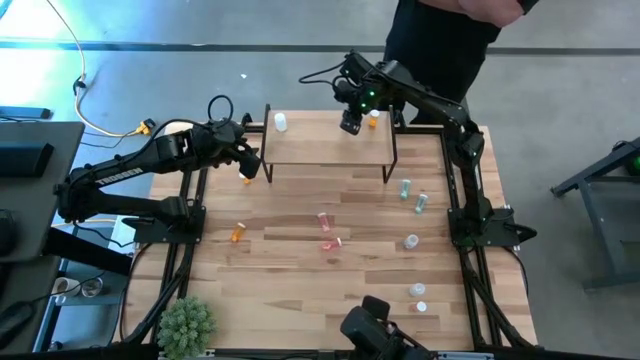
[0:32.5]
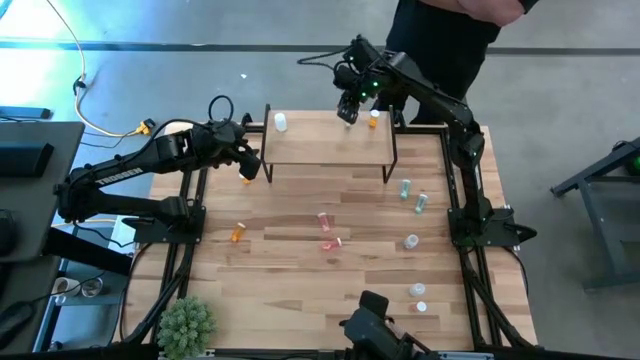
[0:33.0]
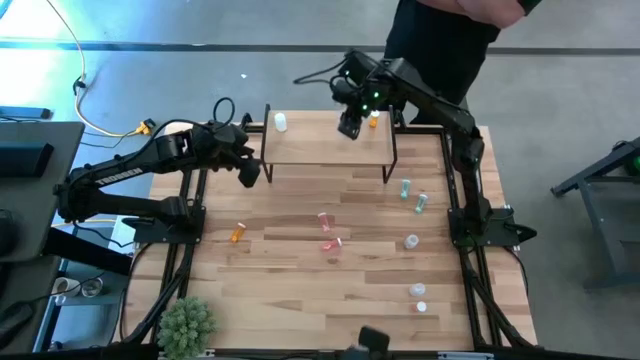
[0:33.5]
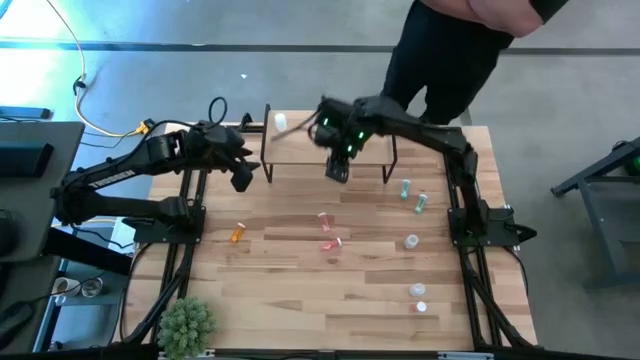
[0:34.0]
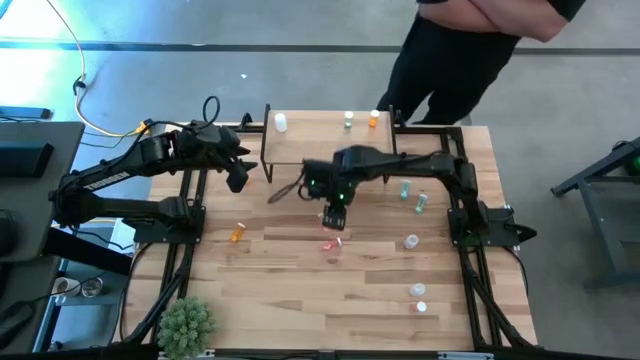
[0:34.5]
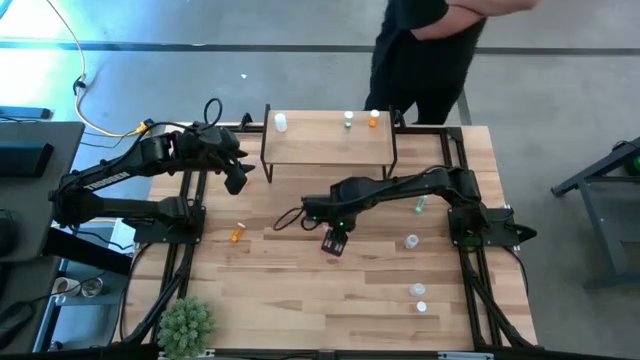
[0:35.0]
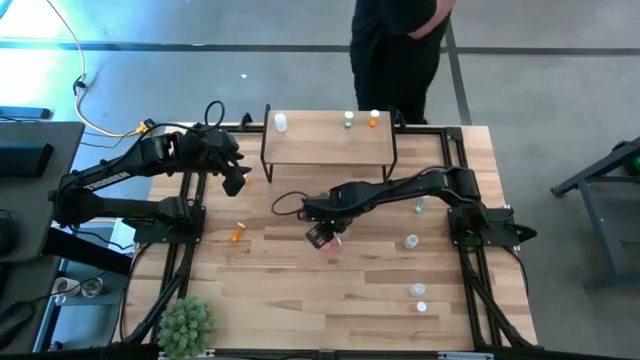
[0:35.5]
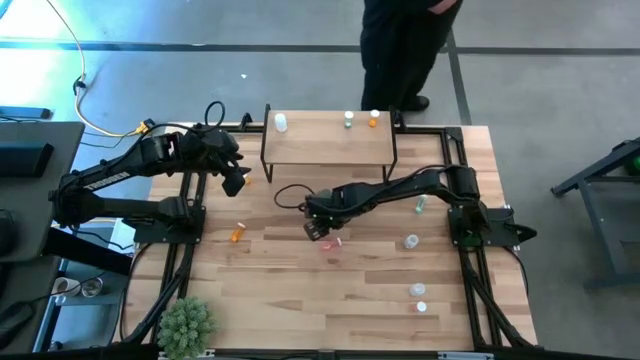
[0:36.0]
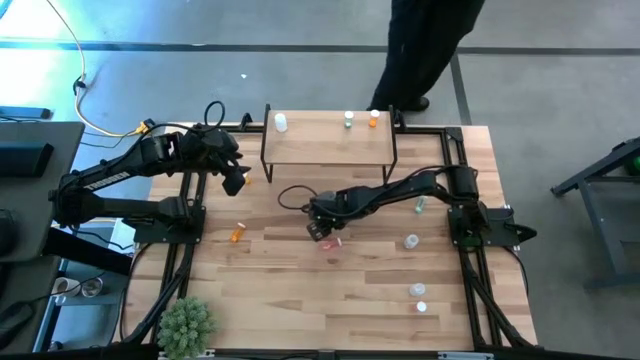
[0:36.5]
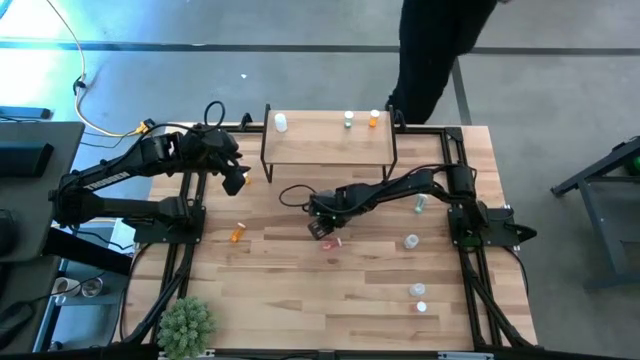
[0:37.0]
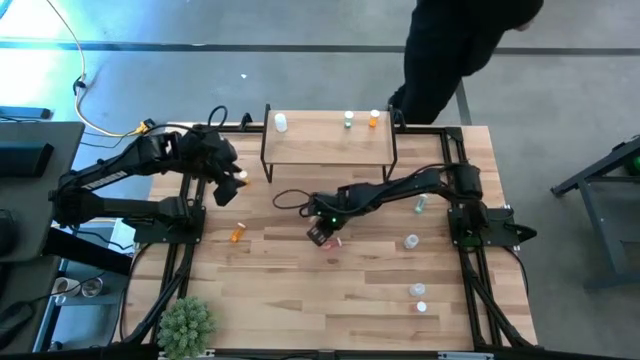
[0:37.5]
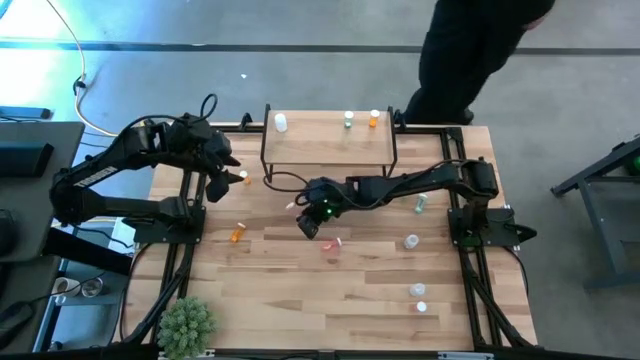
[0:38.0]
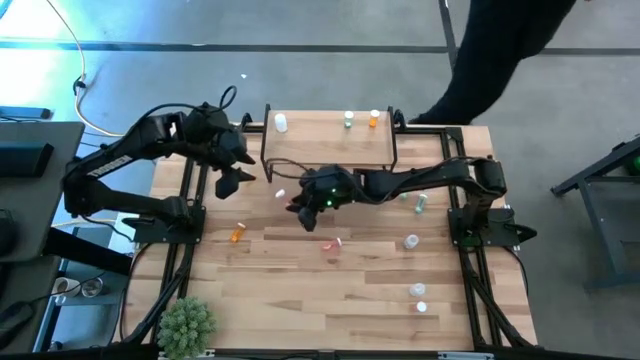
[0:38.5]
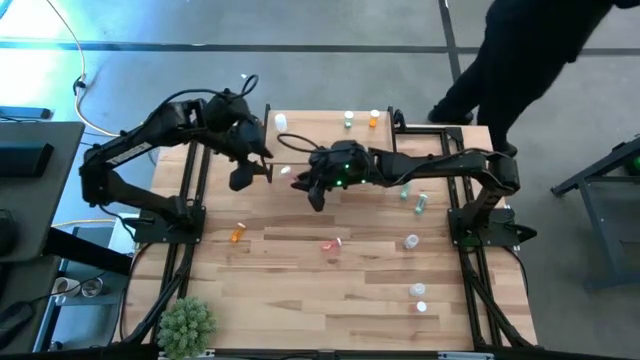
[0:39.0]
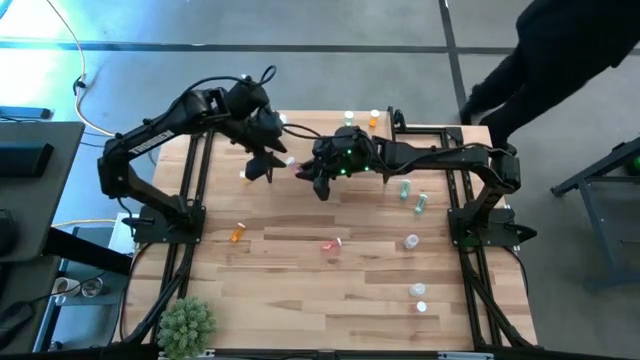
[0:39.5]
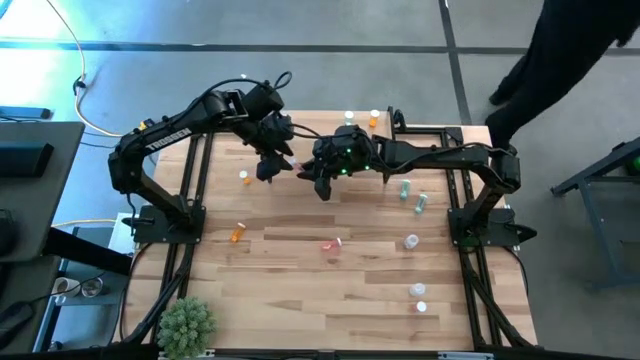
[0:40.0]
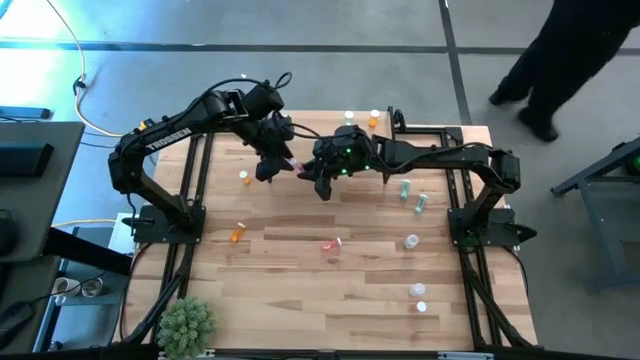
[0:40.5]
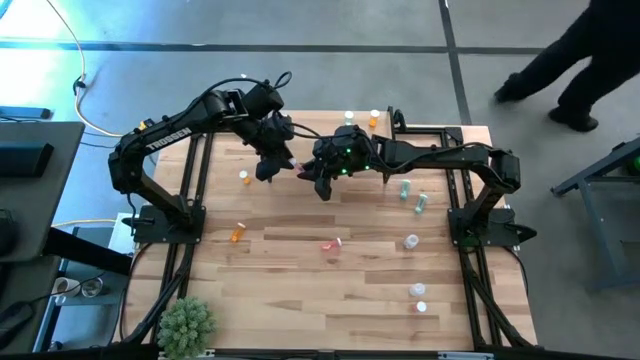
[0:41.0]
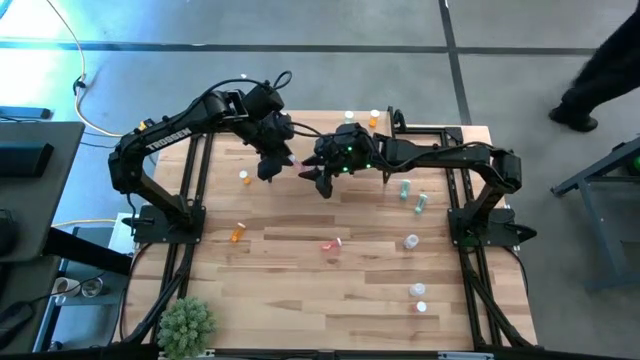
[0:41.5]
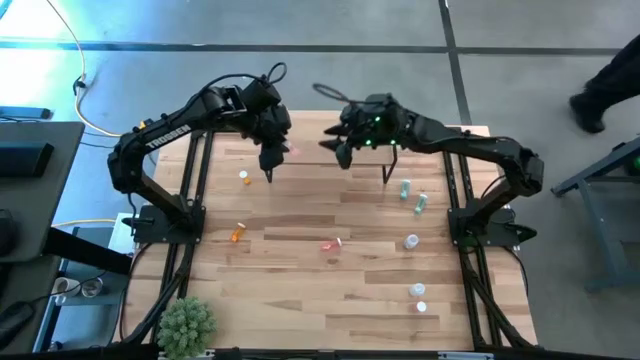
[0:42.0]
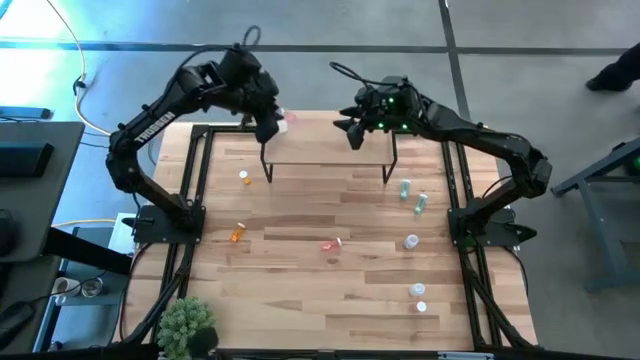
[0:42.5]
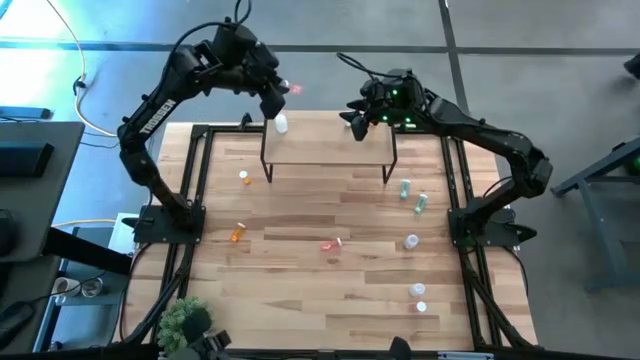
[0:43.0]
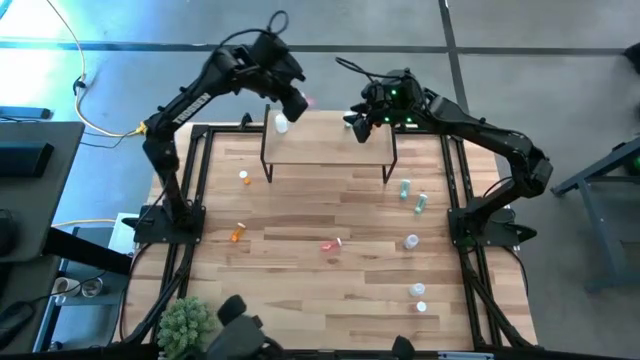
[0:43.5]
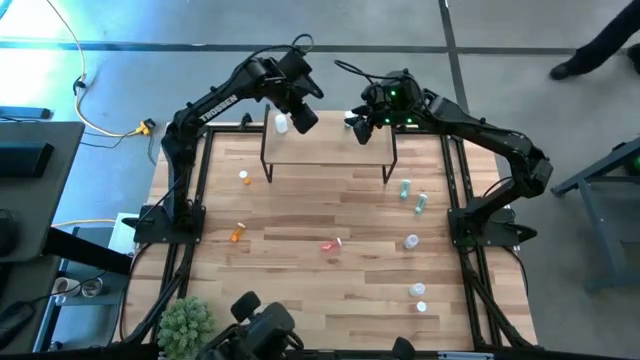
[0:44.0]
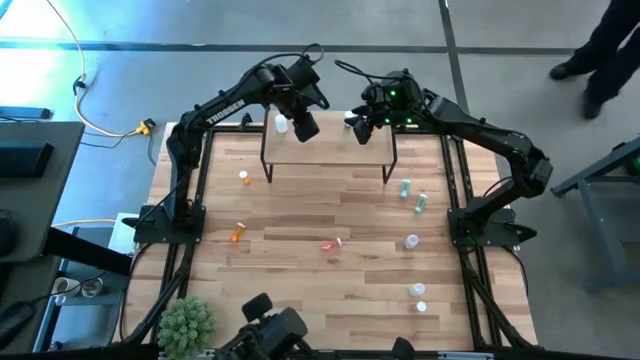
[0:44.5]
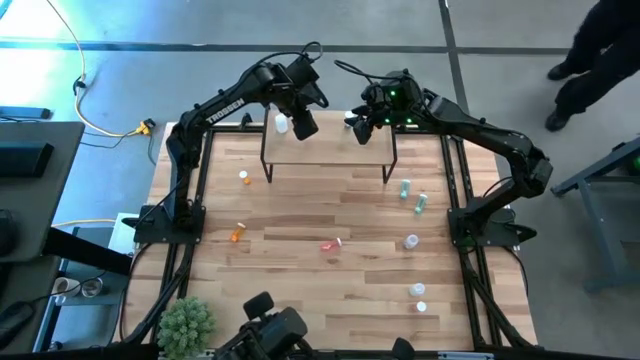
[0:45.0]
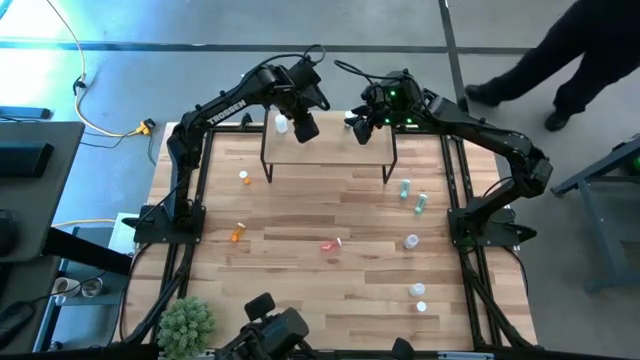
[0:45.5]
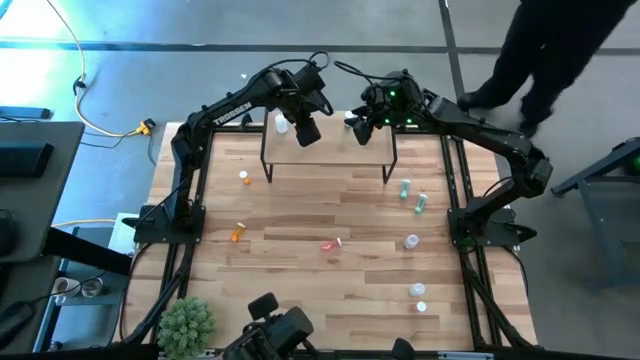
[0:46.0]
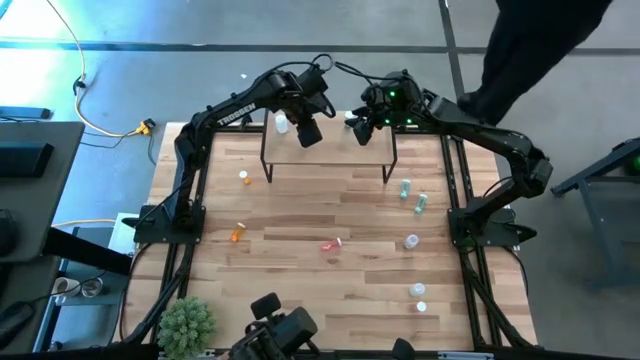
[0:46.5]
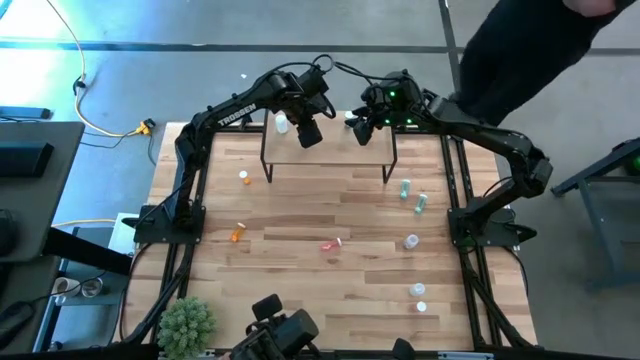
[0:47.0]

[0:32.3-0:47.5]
Task: Pick and place medicine bottles onto shelf by color
Put the top pink pill bottle on the shelf

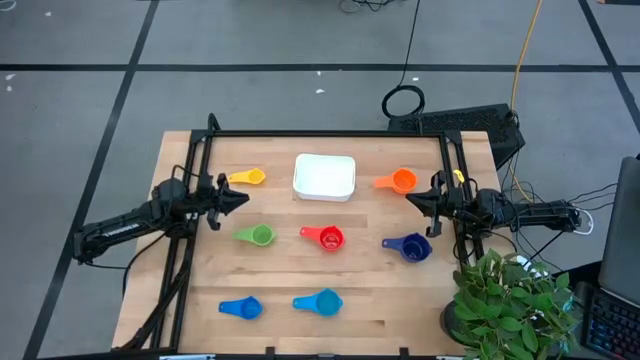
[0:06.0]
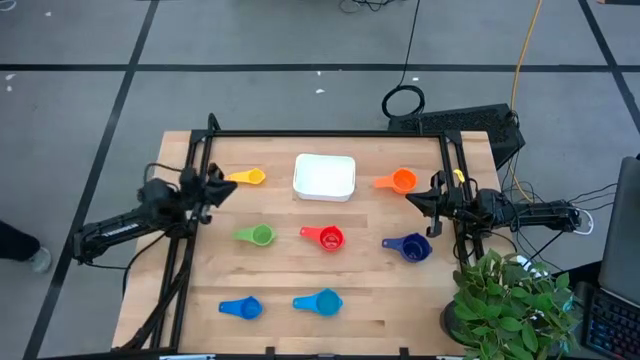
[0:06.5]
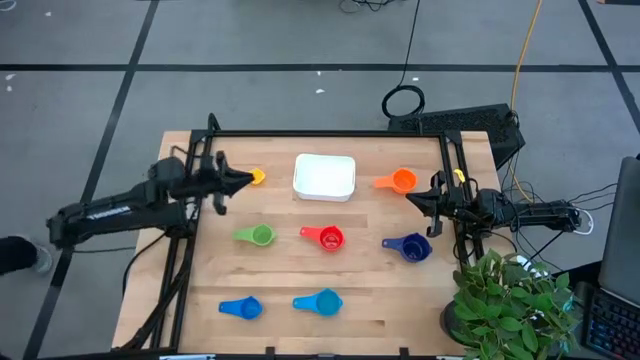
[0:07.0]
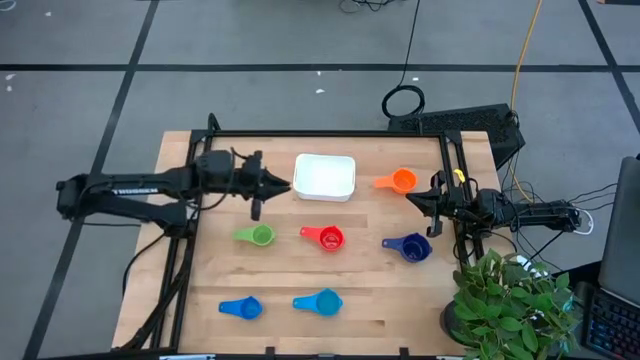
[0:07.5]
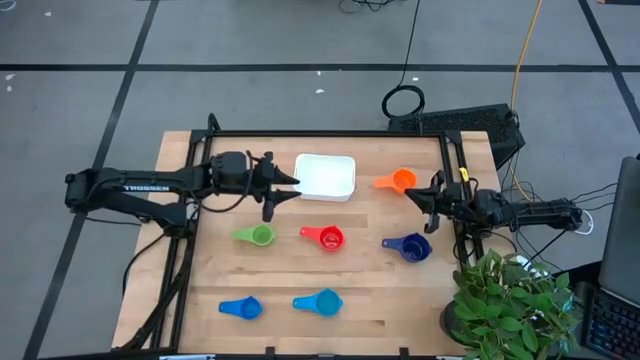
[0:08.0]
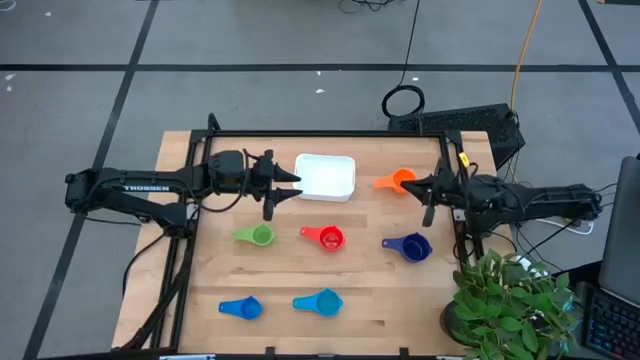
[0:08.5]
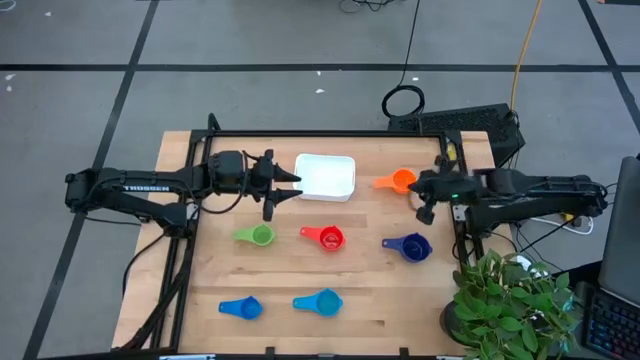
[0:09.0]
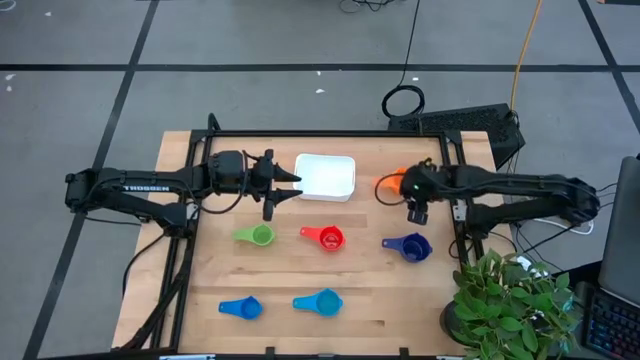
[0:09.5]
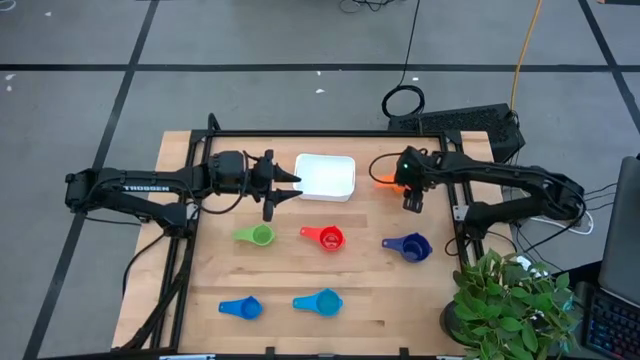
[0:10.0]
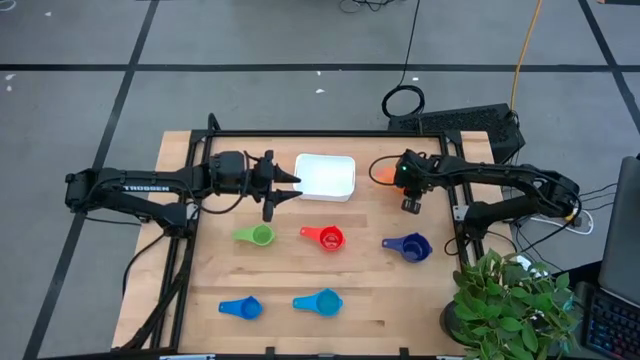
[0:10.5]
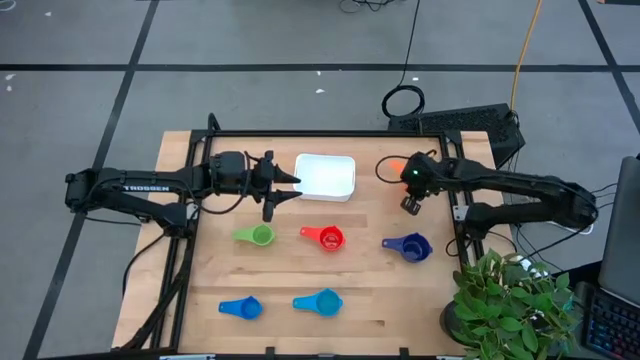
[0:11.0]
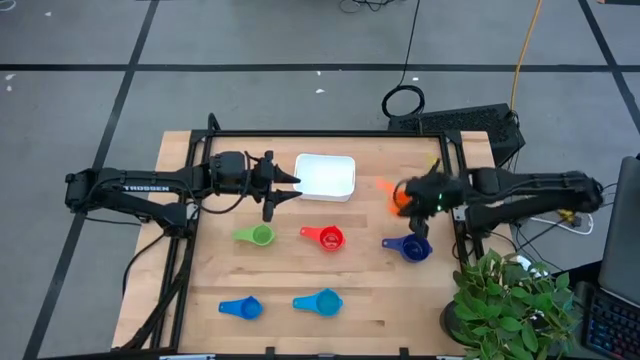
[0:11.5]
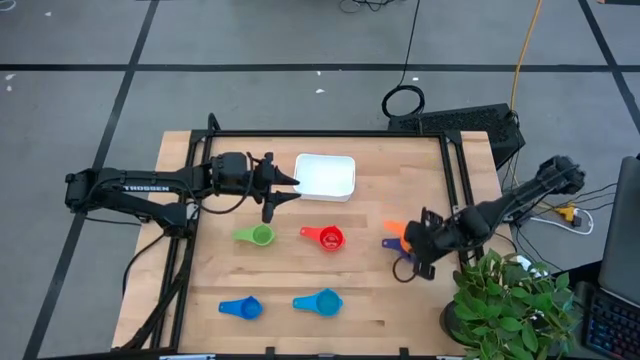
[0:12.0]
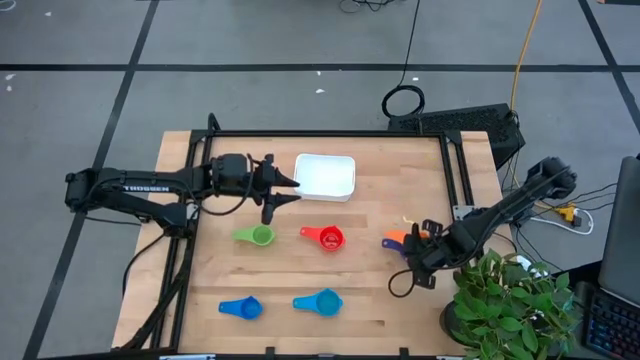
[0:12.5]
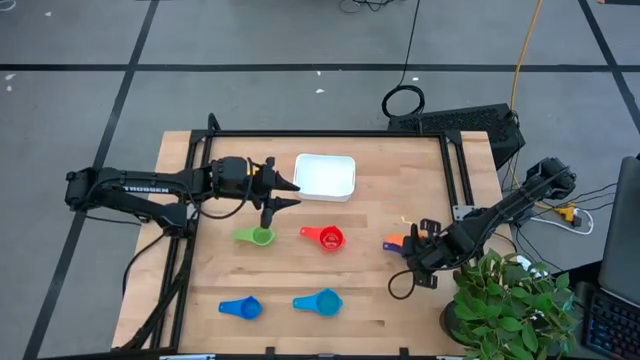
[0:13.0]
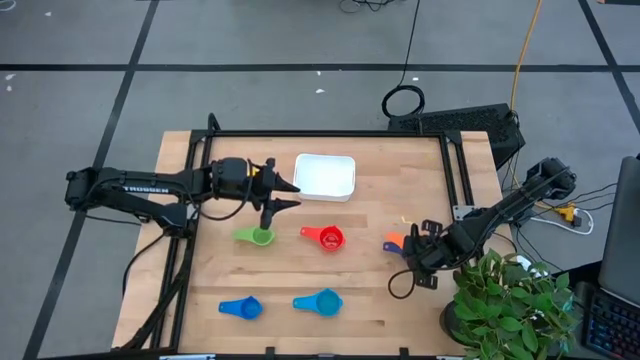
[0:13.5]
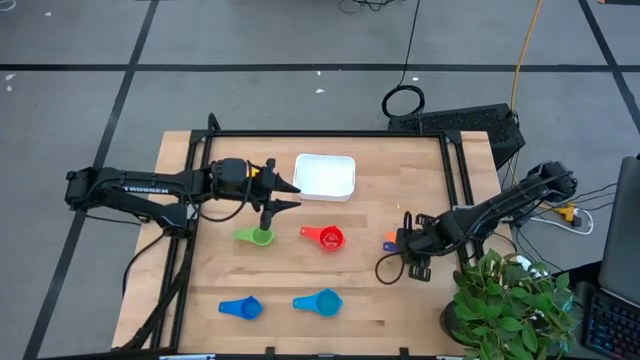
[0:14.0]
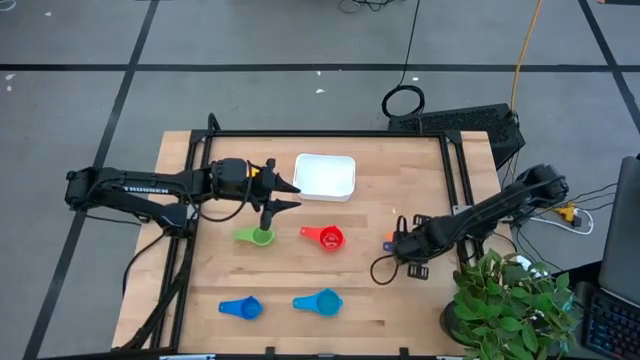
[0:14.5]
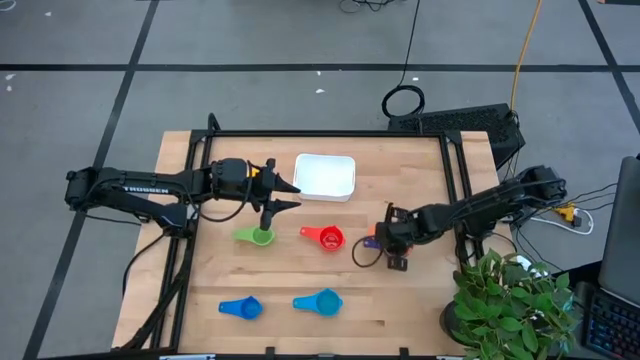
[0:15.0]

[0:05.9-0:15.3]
Task: Nest measuring cups in basket
Stack the orange measuring cup on top of the violet measuring cup
